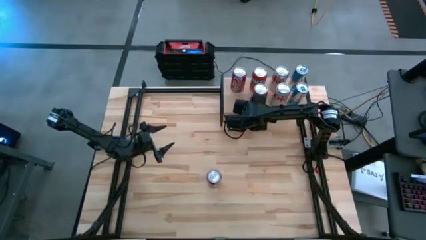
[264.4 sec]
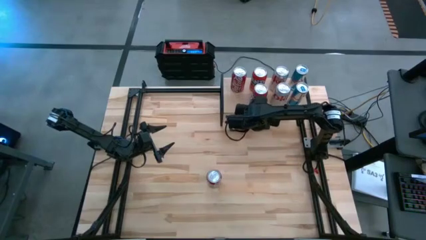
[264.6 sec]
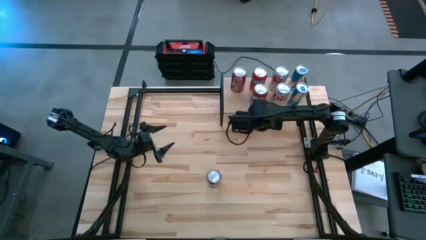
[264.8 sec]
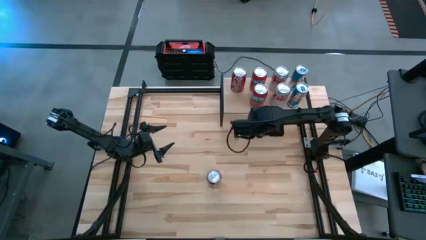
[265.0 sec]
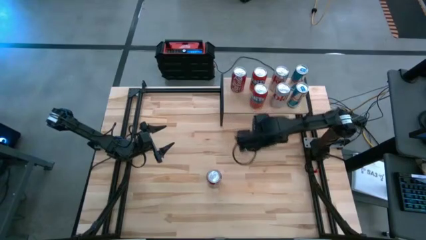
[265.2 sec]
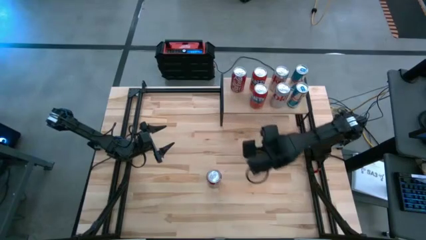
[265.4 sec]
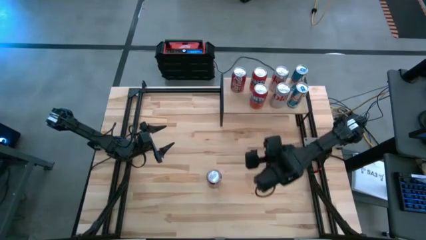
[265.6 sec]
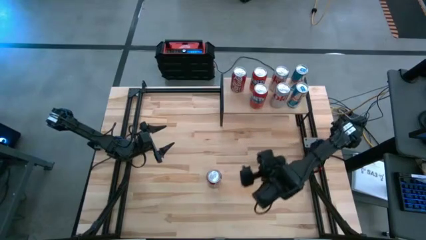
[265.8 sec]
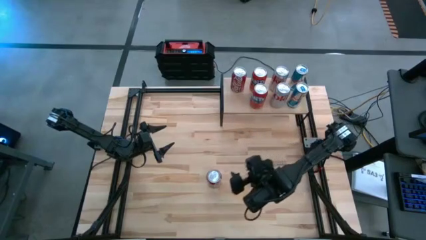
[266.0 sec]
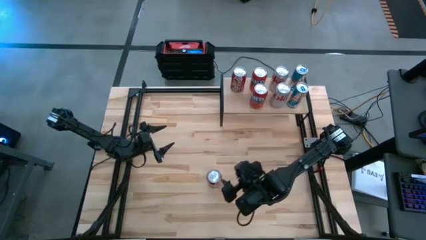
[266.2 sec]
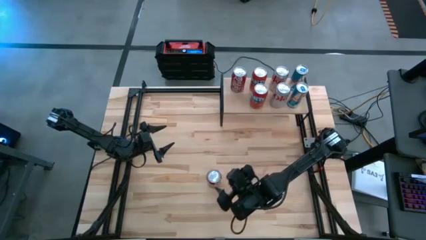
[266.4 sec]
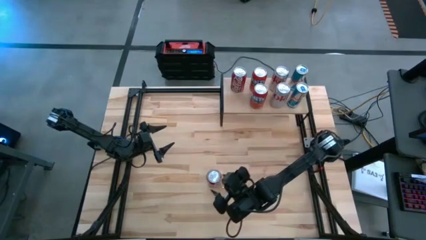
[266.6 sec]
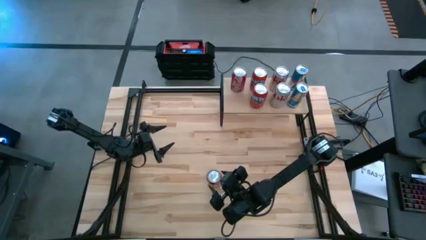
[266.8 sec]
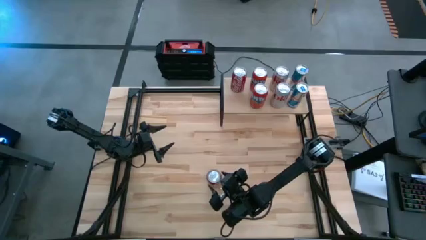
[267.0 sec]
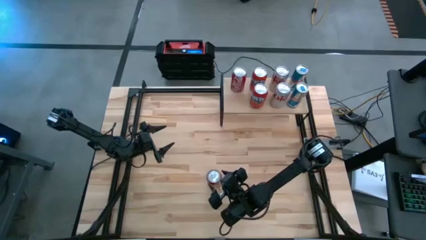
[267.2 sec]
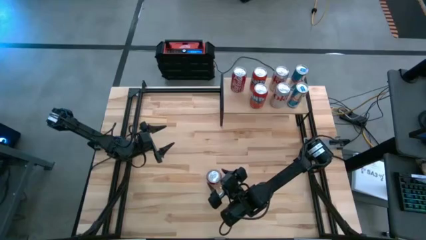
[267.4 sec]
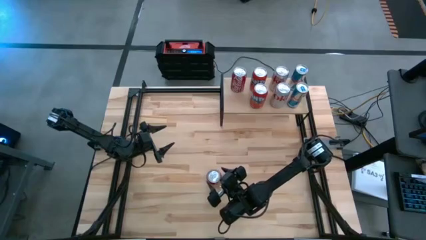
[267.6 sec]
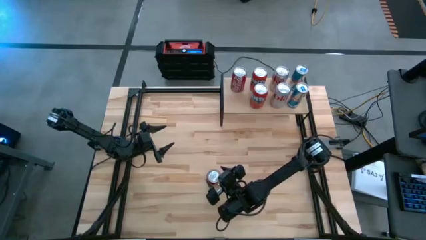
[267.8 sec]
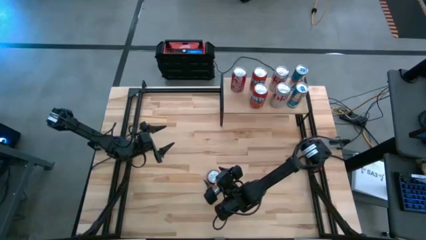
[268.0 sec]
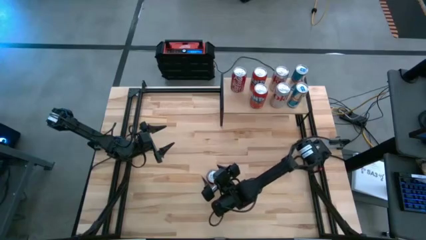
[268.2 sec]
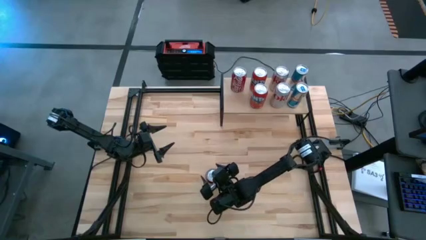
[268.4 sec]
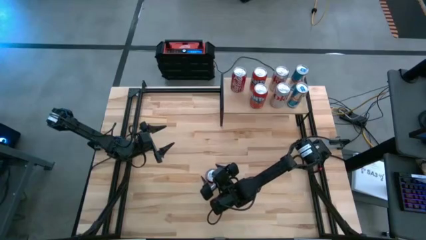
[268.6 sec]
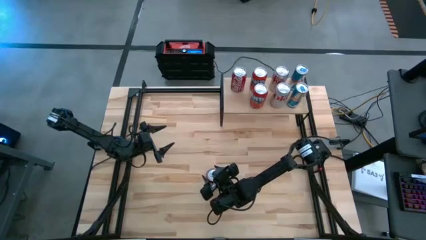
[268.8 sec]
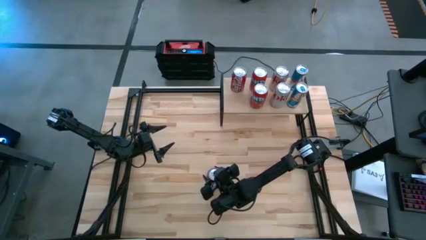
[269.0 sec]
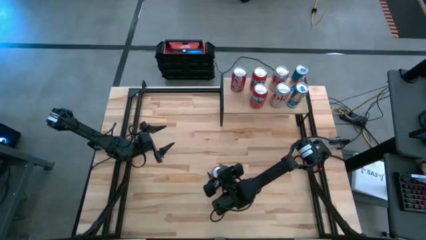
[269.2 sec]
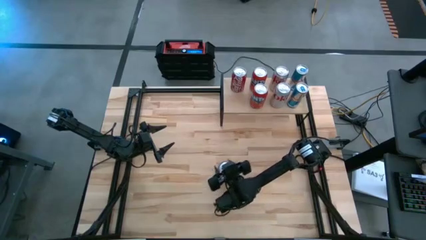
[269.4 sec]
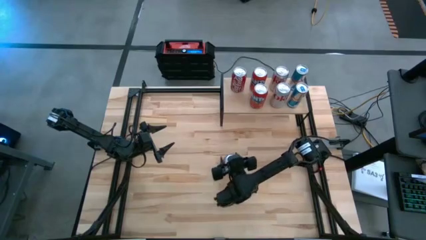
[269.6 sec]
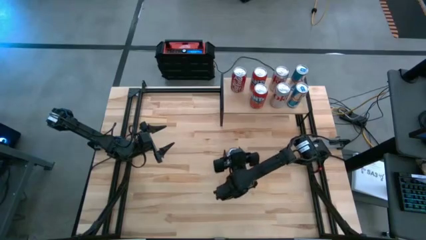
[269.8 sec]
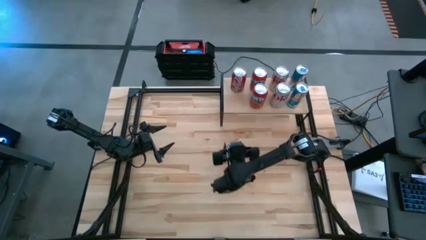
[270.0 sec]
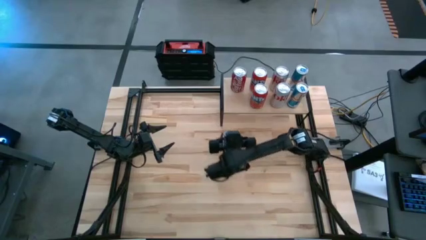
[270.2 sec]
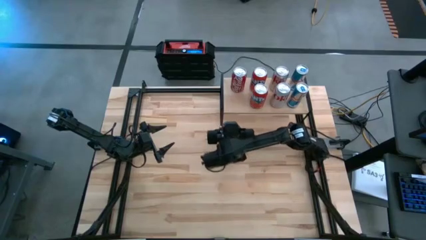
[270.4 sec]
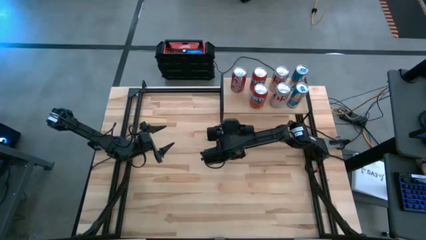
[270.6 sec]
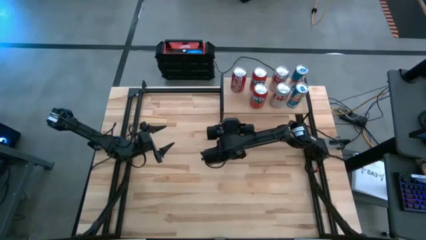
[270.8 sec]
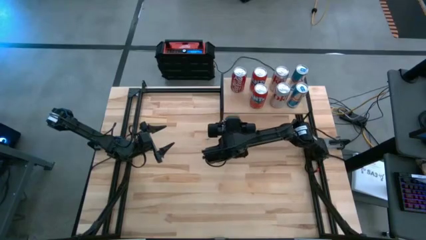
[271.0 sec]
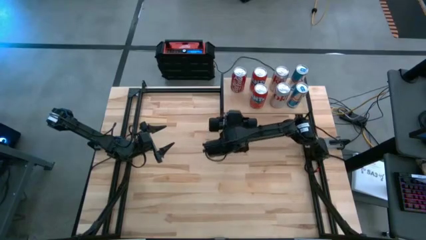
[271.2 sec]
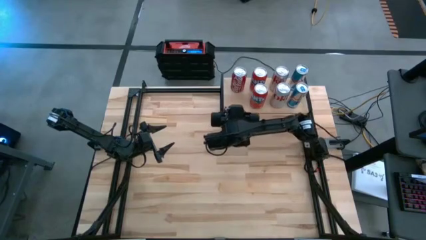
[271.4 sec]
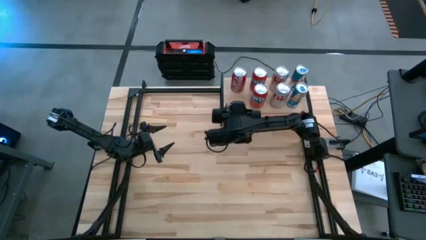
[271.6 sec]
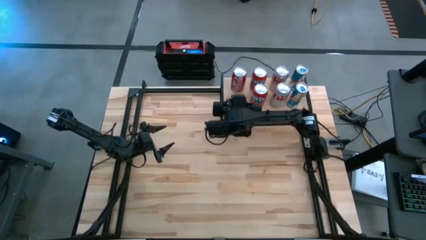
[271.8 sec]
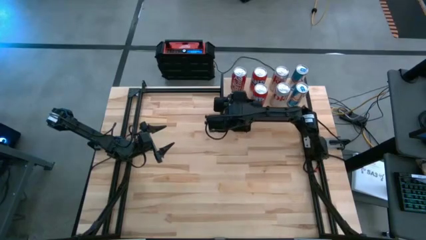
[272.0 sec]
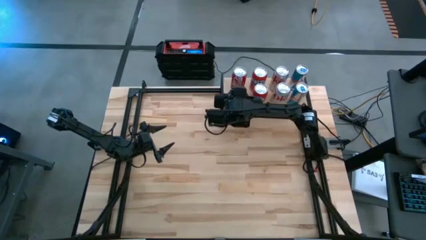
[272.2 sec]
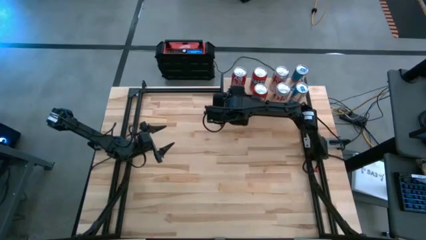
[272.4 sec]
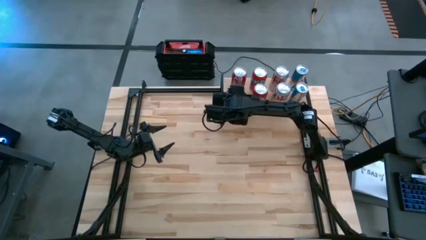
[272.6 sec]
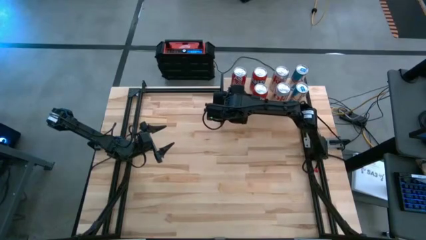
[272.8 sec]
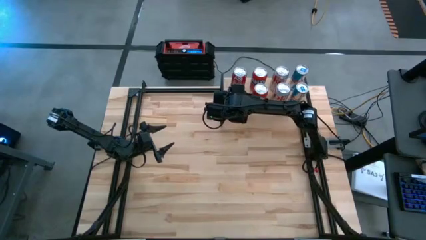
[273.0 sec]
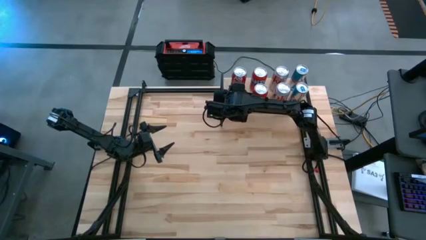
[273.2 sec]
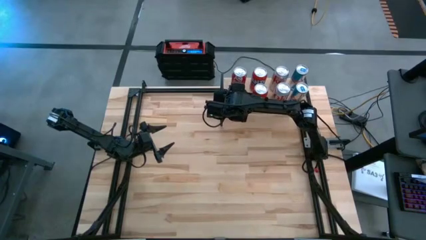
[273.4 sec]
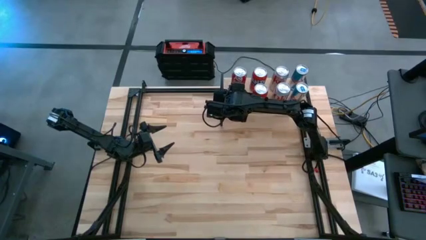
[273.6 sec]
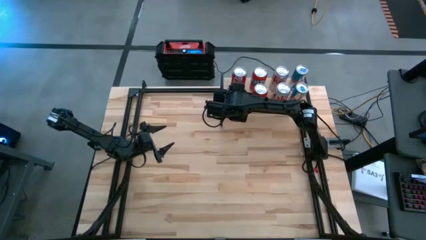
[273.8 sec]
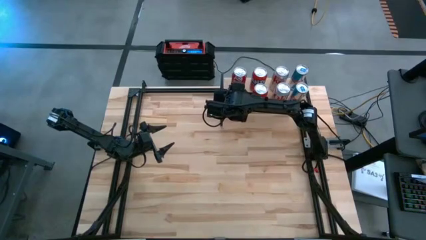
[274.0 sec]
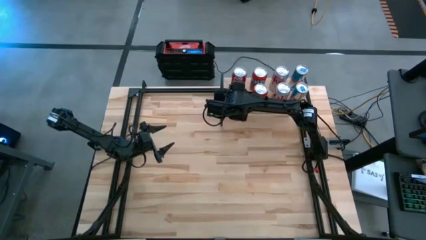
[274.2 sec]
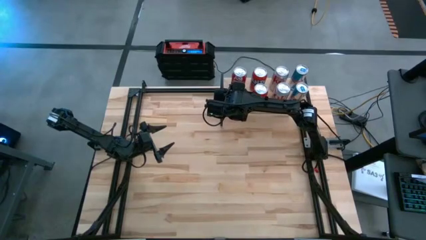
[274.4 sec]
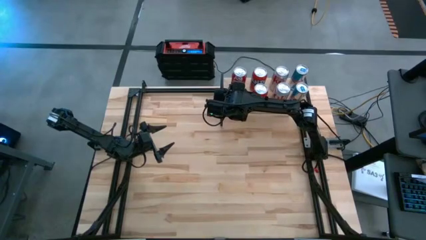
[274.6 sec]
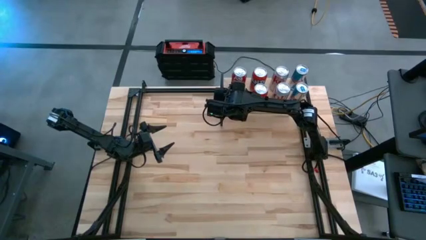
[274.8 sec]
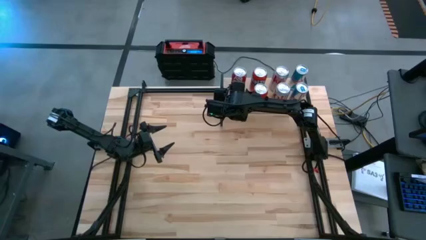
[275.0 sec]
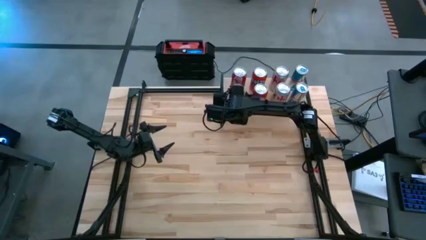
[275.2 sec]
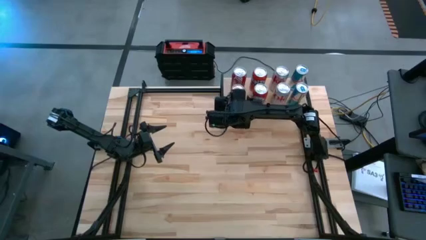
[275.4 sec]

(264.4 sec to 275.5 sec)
Task: Place canned beverage on shelf
Put the red white soda can on the shelf aligned with the other red white soda can

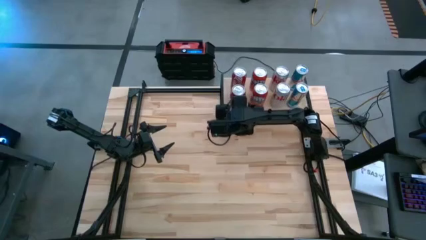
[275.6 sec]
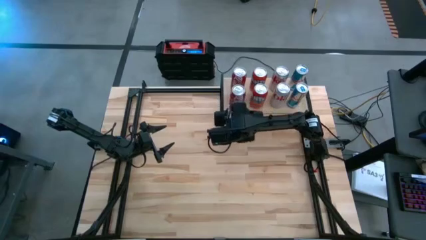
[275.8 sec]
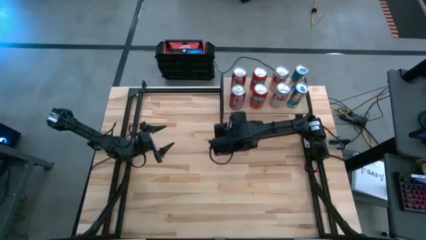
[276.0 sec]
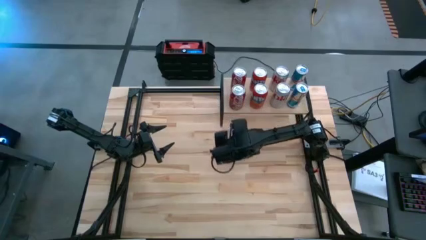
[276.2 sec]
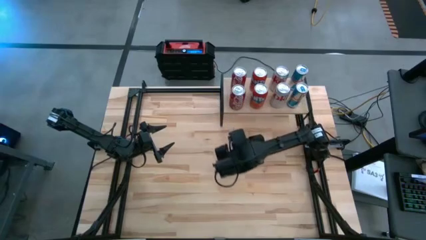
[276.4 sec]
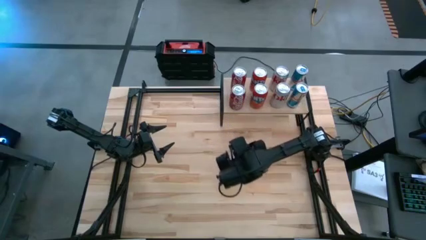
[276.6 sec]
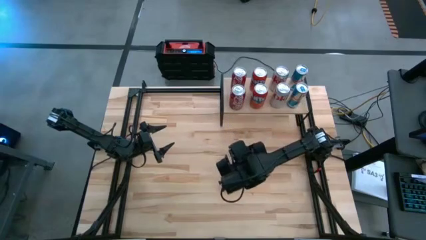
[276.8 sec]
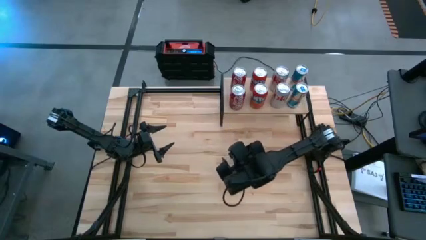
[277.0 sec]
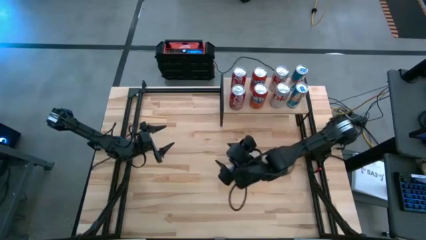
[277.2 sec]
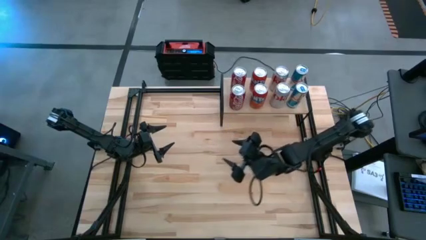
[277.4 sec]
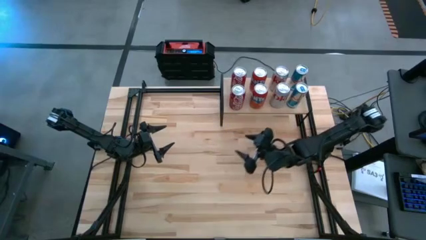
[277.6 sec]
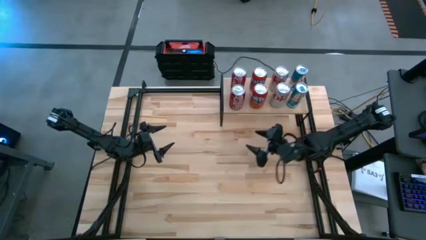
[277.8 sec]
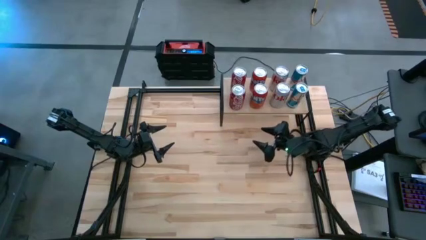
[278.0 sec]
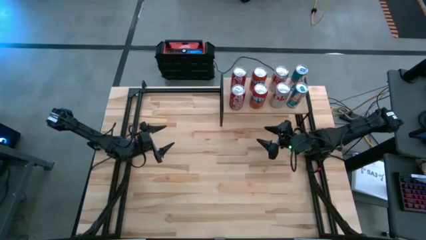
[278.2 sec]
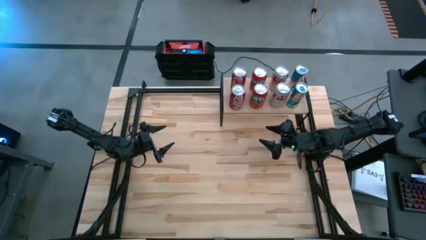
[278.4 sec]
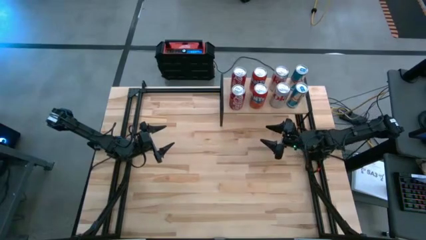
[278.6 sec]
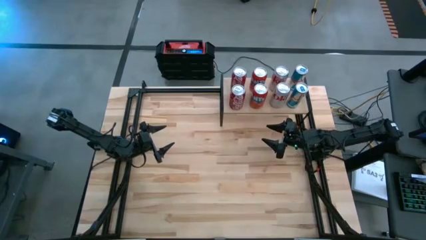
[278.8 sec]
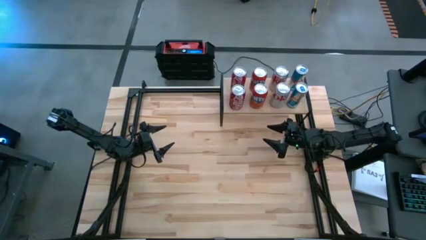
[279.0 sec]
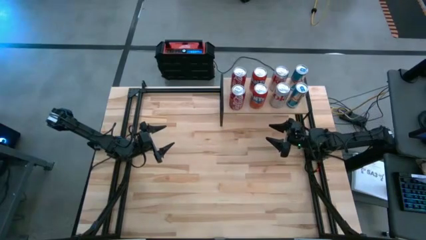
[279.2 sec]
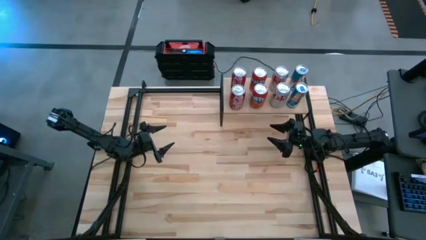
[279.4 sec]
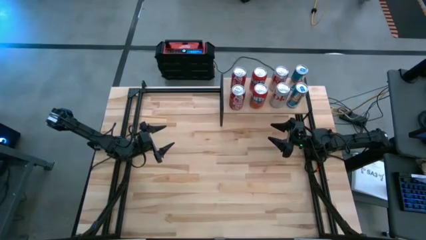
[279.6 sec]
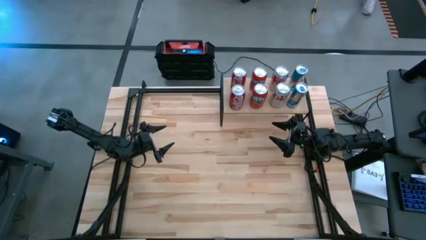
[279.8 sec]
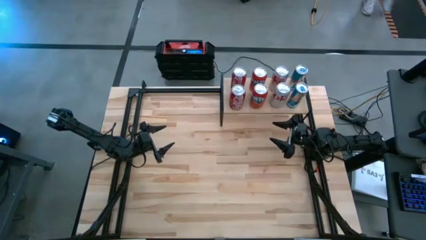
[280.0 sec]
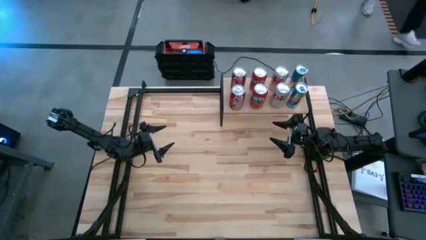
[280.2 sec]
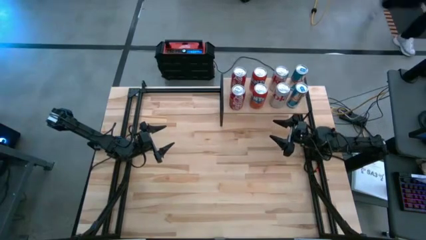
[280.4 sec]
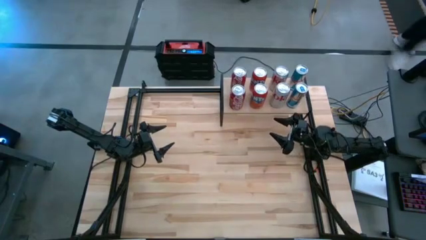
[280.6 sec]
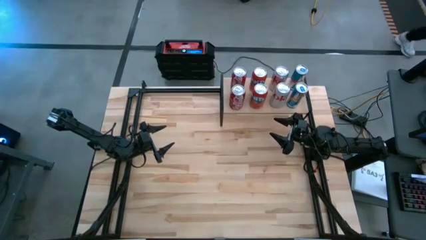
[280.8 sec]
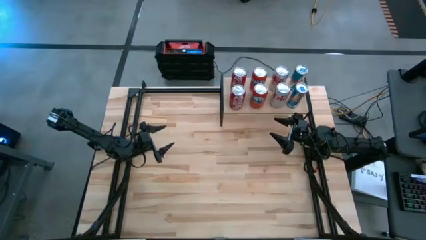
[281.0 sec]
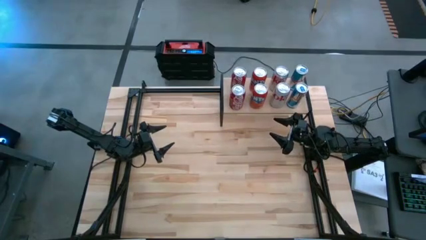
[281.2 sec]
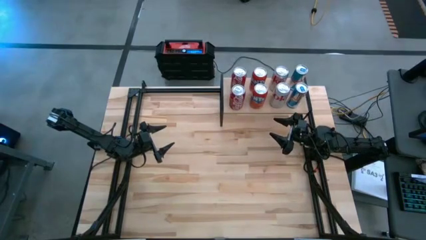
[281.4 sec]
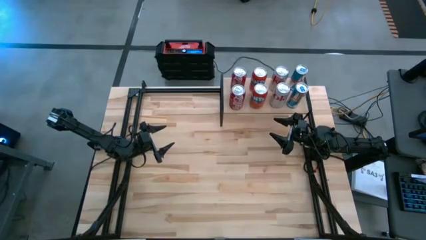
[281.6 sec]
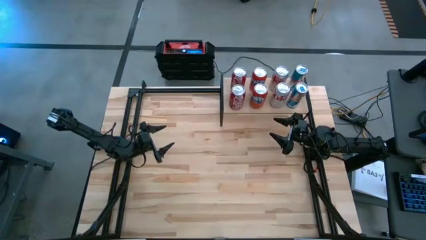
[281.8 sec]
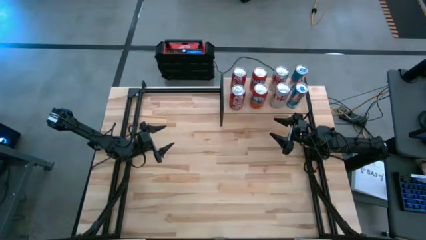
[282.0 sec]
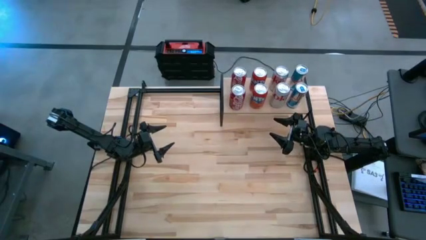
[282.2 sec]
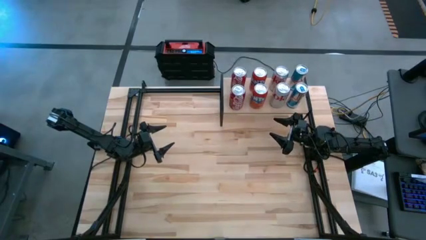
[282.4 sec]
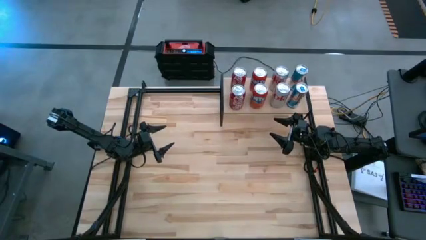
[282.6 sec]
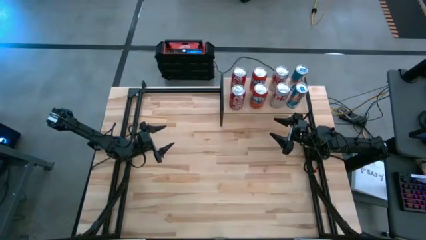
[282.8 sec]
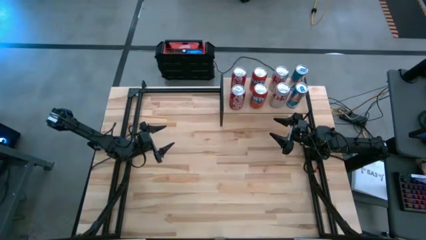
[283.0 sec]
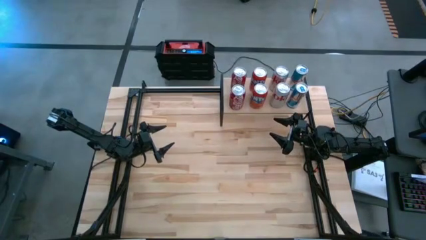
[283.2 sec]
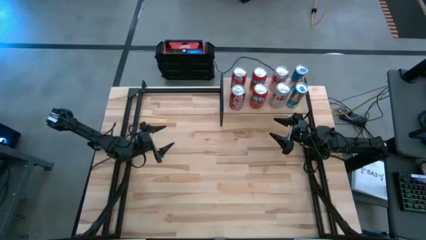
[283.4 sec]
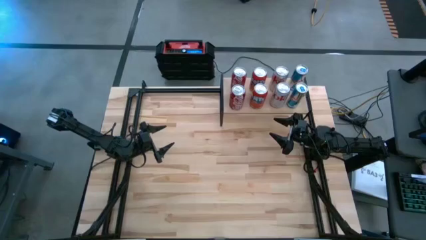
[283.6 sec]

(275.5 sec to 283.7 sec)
Return to Home Position
